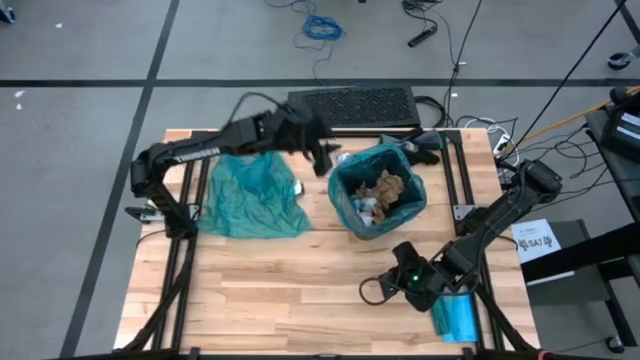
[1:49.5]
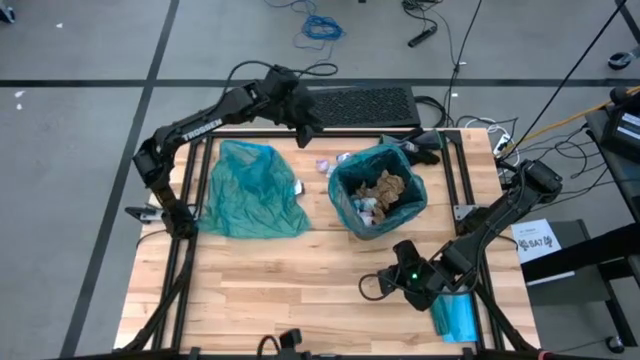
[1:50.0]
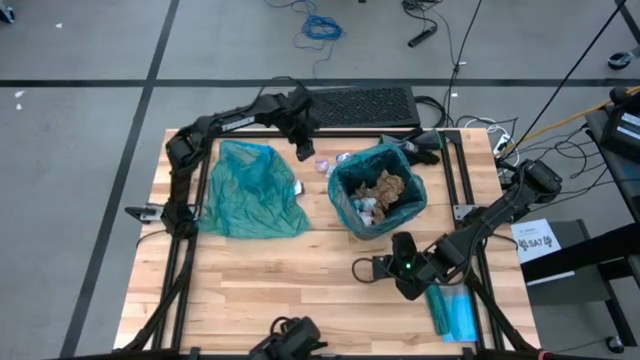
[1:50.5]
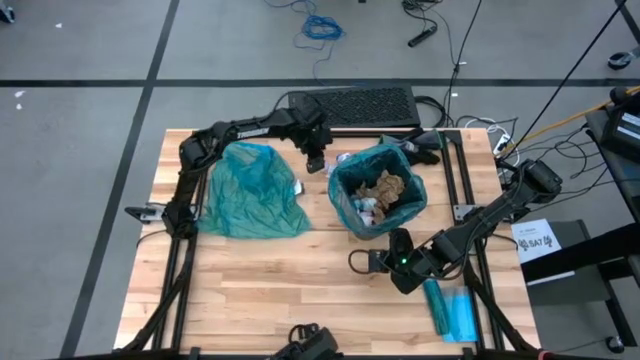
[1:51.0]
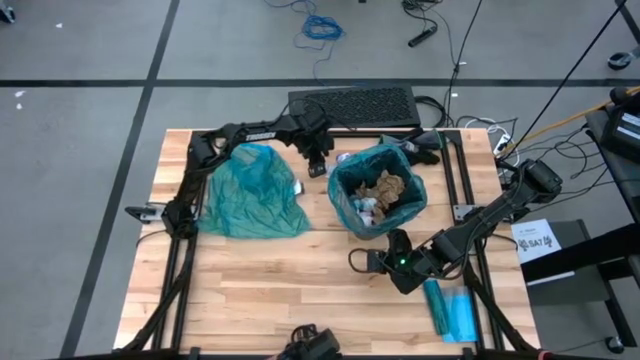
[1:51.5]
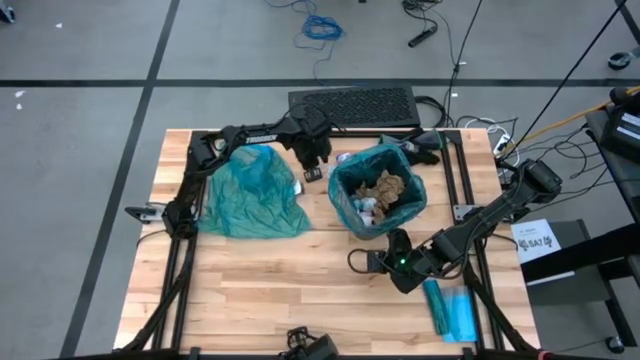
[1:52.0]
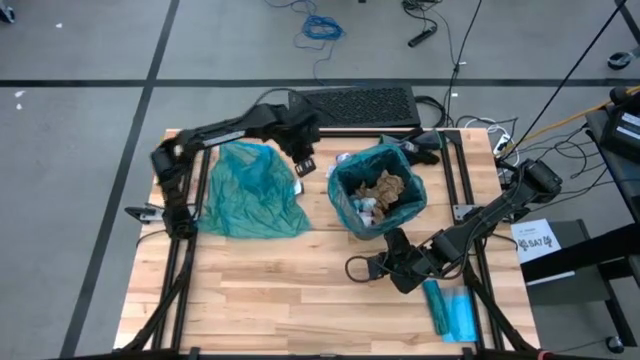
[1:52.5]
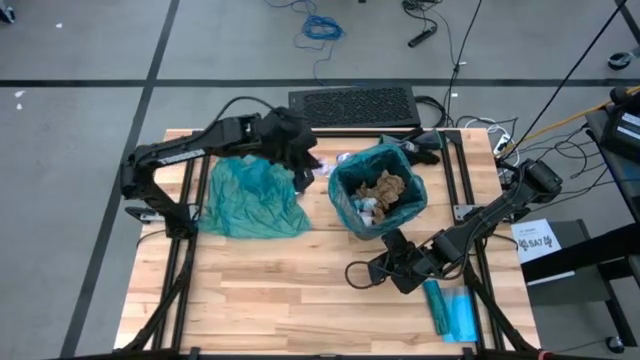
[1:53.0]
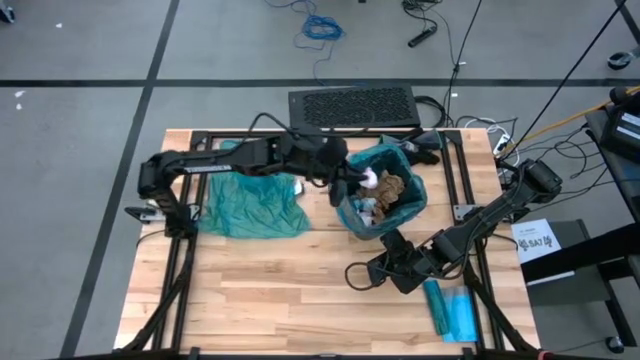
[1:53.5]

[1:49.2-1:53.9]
Task: place trash/remove bag and relplace
Put the pink trash bag into the trash bin

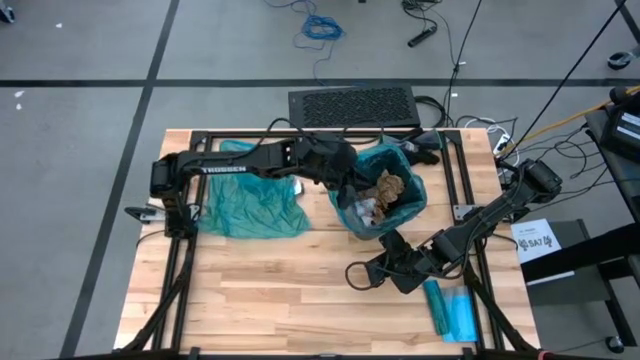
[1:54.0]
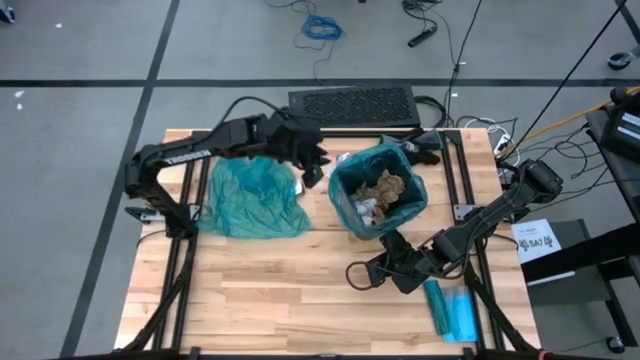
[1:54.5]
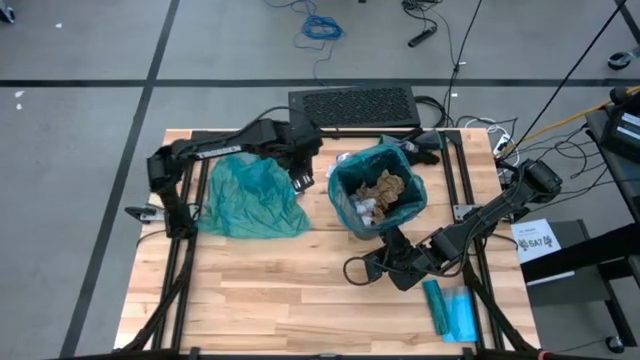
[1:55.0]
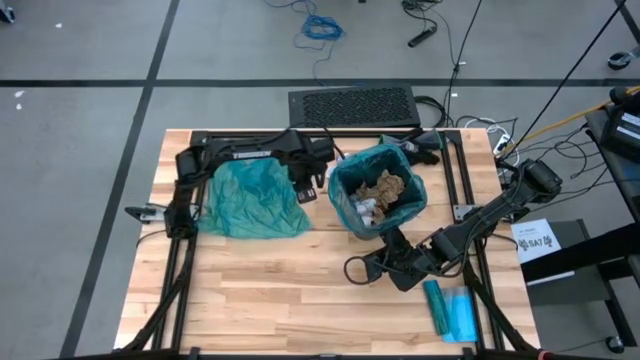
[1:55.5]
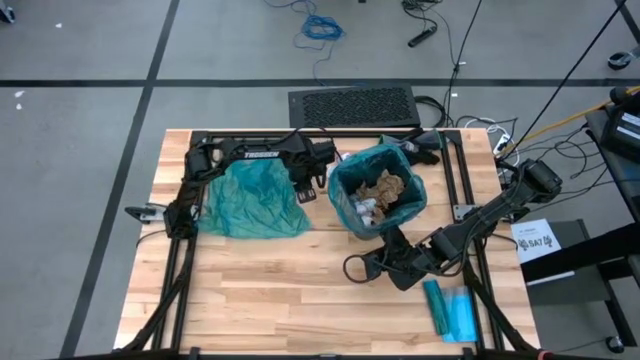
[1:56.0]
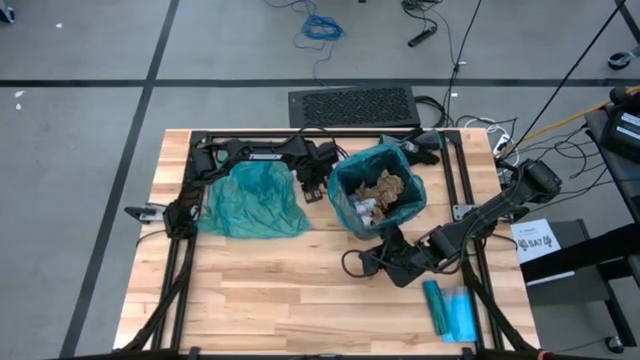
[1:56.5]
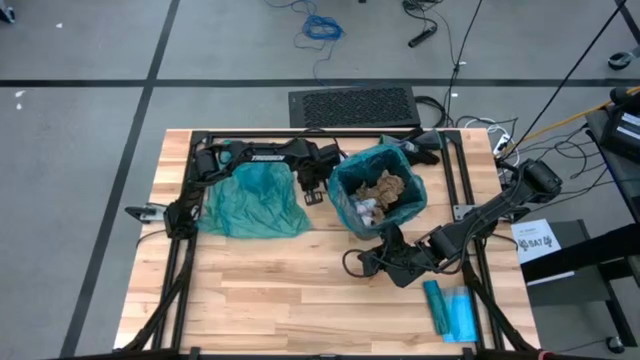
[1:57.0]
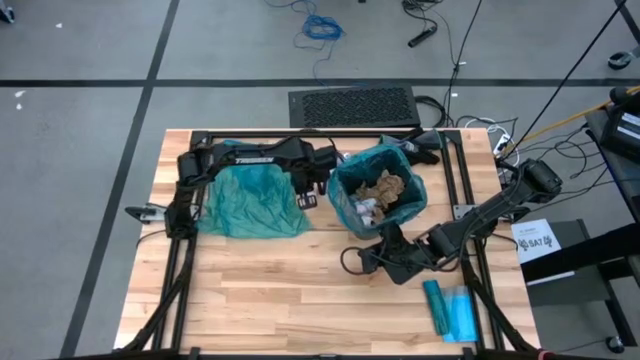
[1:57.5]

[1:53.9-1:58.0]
Put the white paper into the trash bin

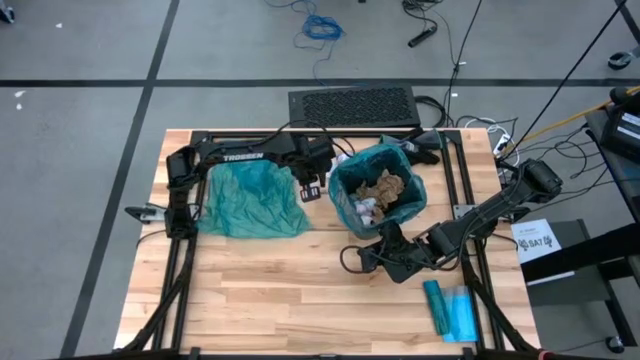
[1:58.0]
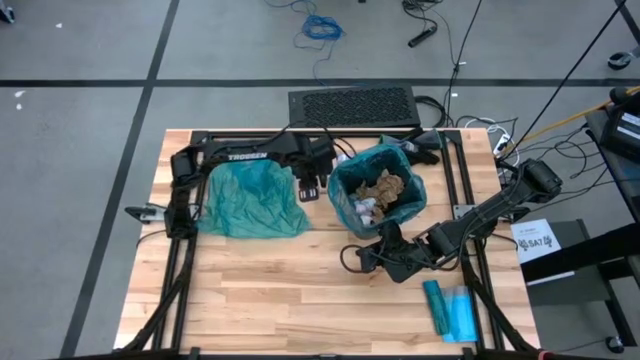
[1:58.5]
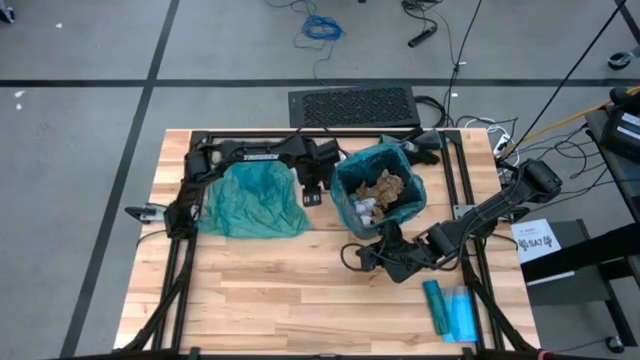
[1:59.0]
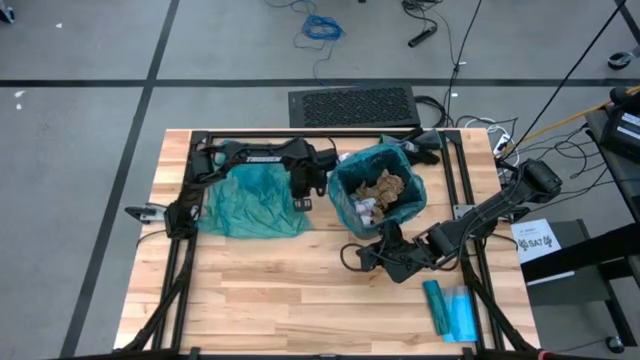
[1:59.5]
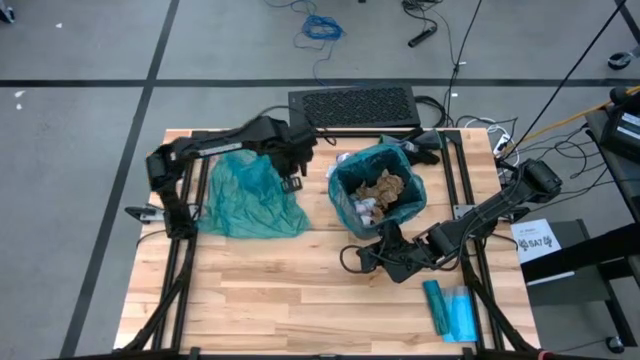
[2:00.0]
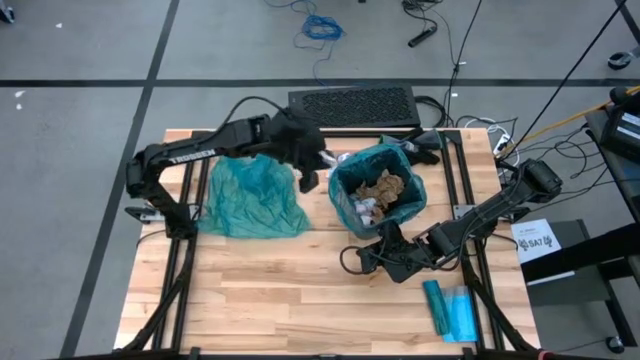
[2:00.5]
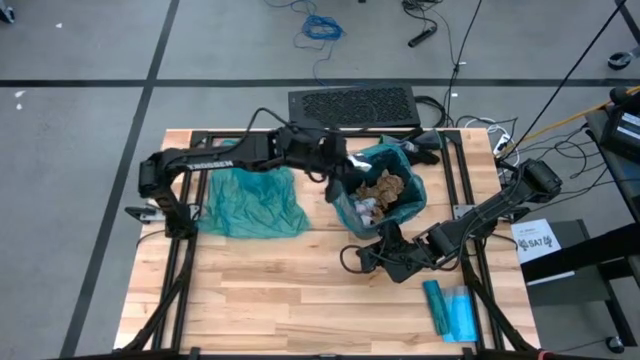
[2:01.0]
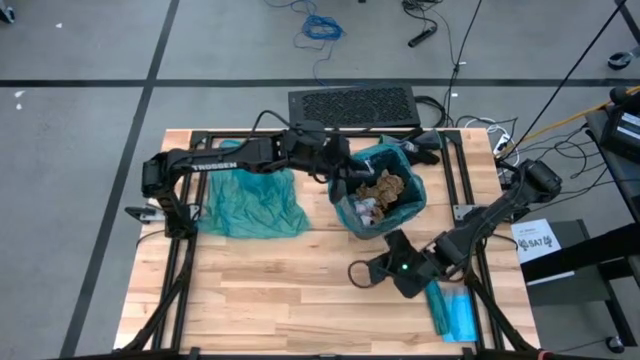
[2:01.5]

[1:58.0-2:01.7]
Put the white paper into the trash bin

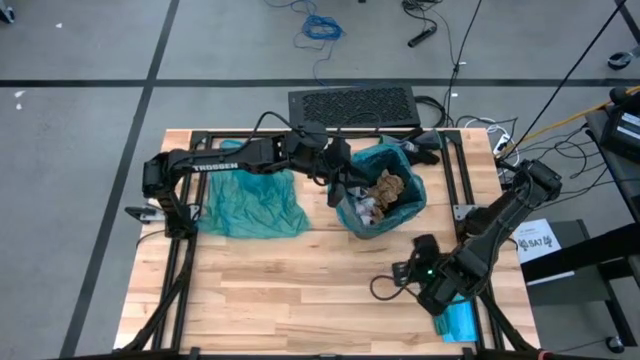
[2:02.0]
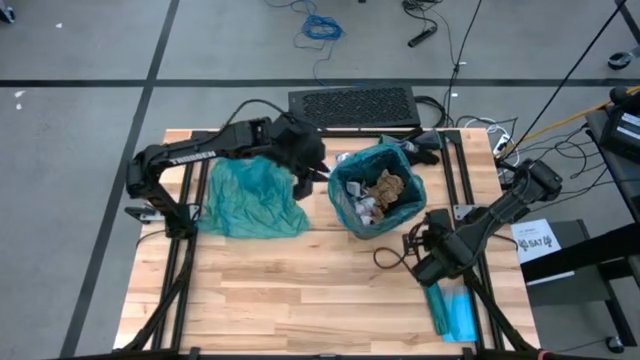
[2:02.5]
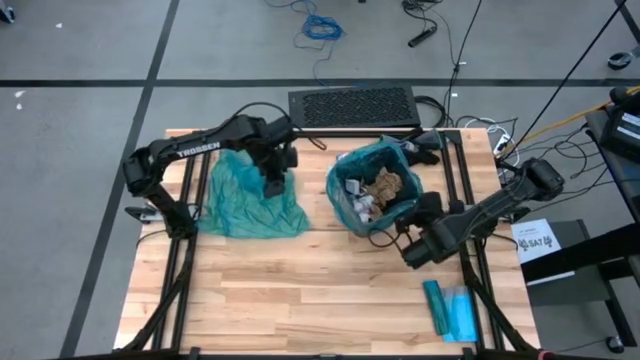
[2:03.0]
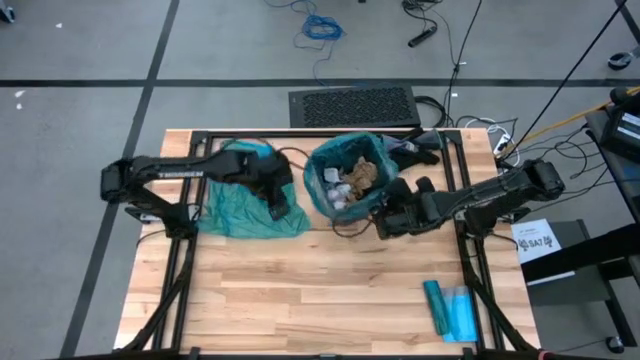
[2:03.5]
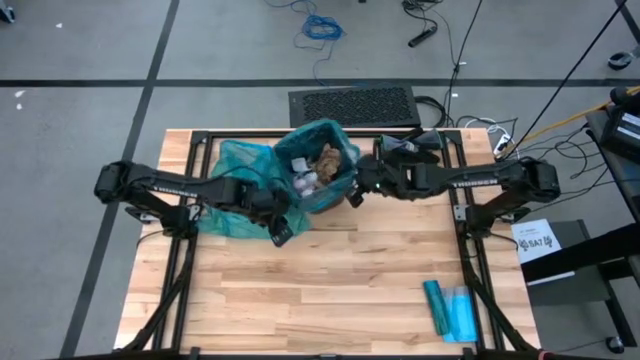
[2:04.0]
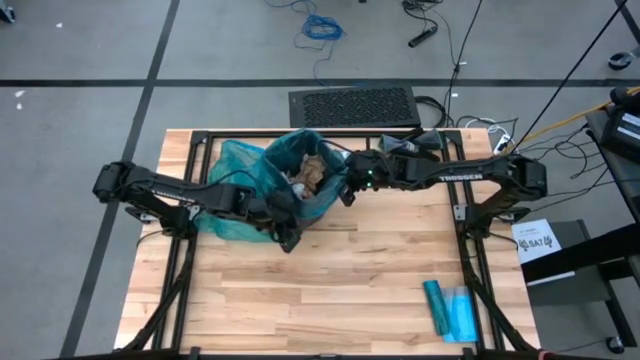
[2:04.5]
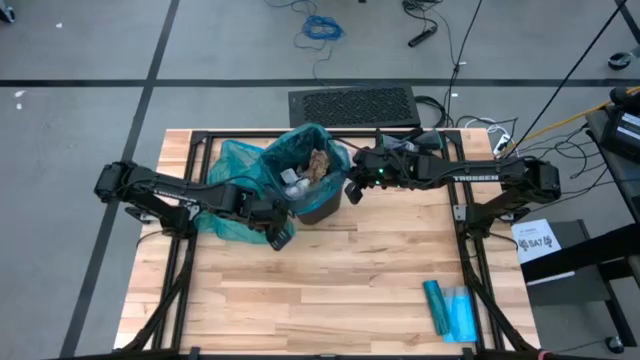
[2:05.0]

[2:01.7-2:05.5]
Adjust the trash bin on the table

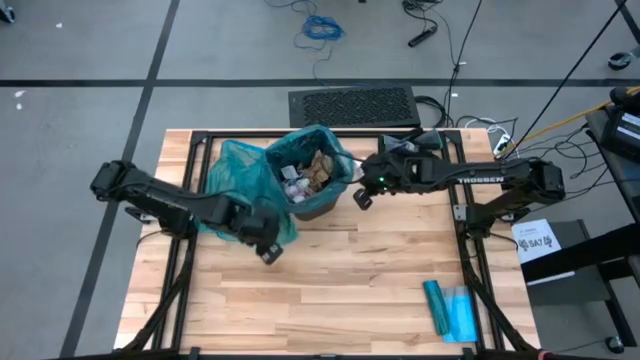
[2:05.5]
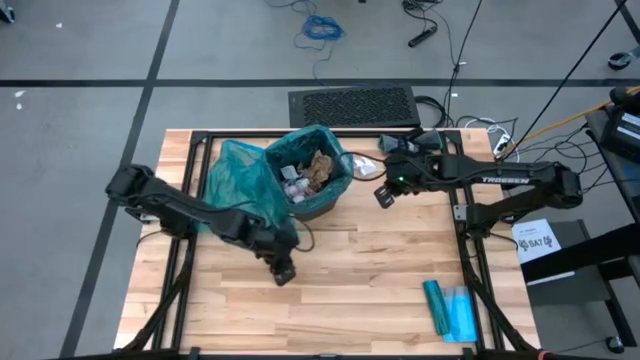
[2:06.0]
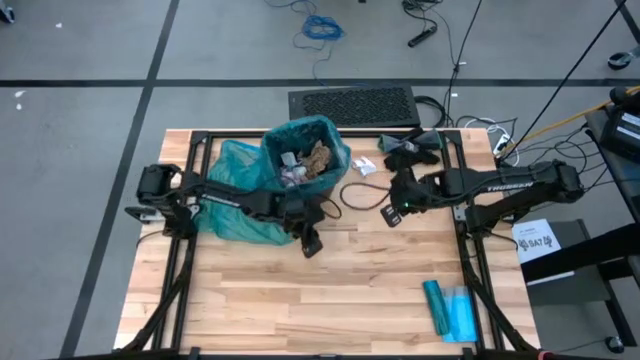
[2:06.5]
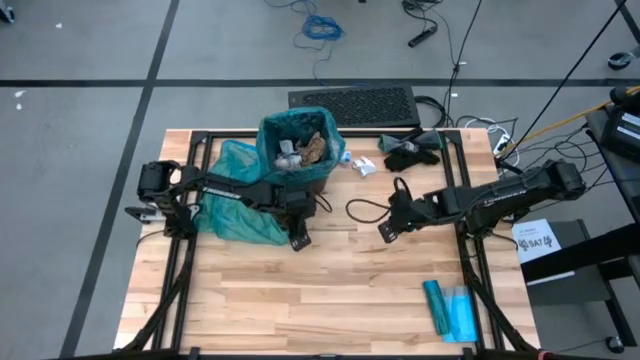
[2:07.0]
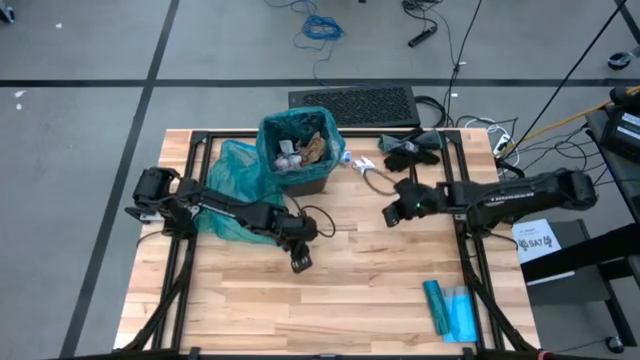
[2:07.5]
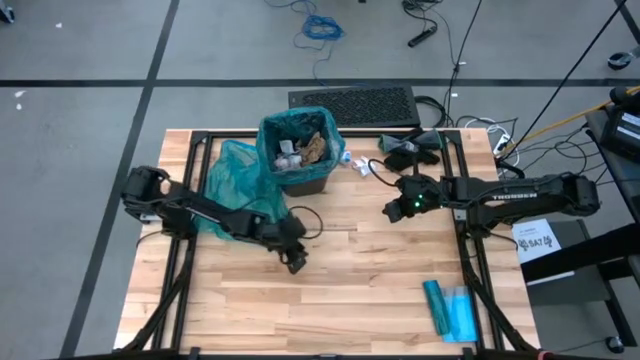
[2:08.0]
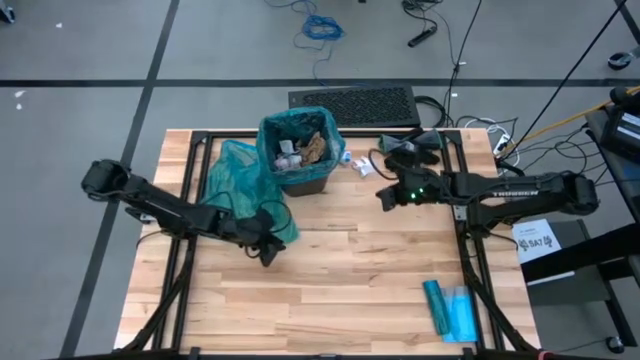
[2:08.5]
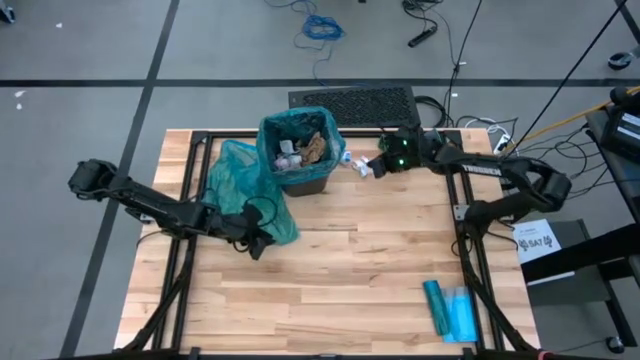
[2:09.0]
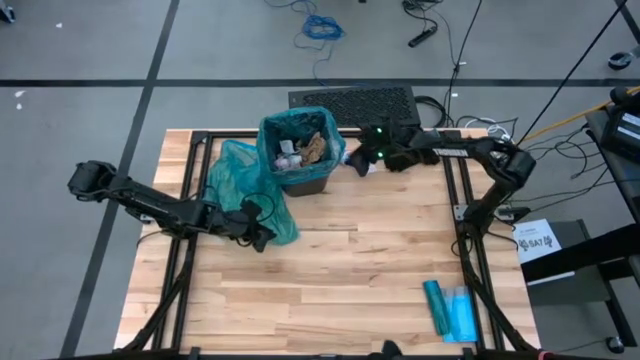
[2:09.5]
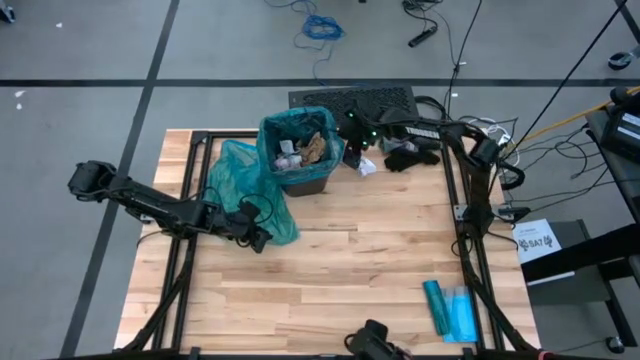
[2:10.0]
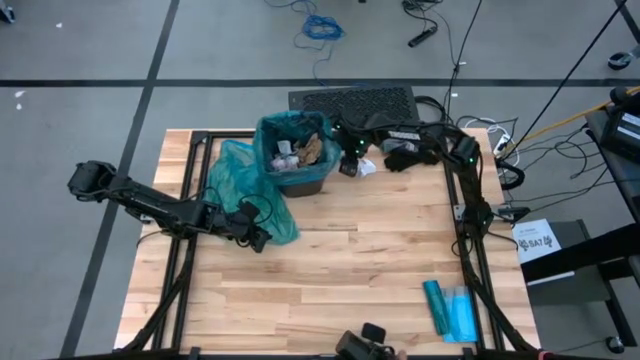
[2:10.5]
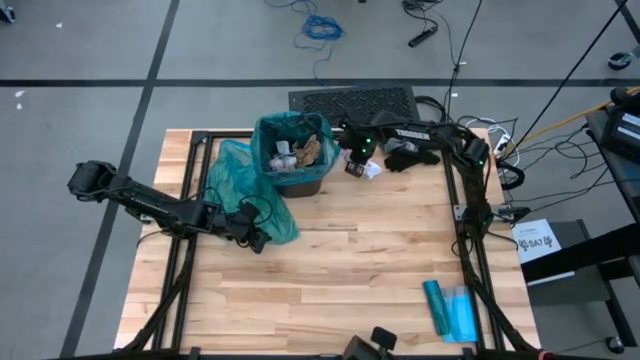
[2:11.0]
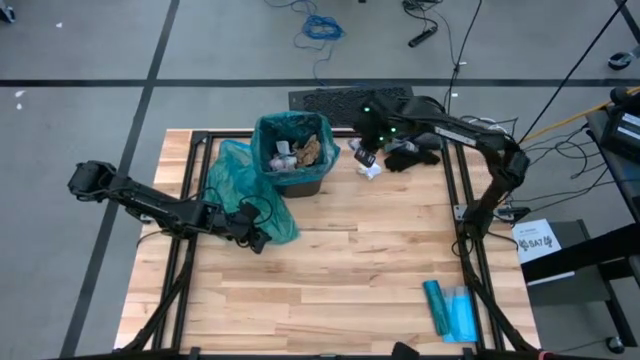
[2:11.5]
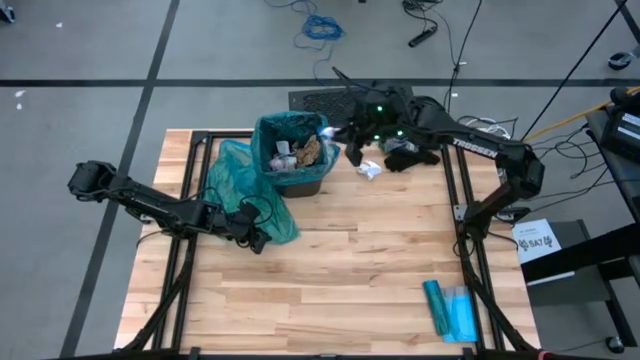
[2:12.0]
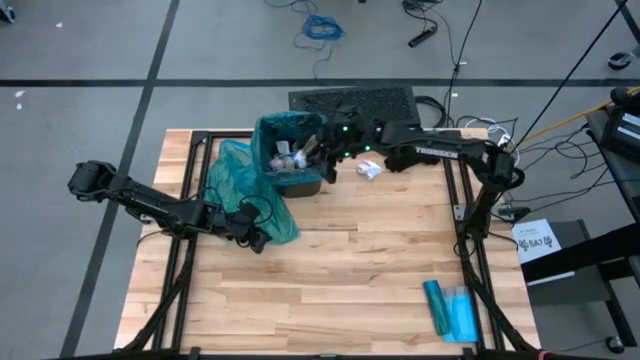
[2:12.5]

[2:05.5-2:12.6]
Put the blue trash bag into the trash bin
